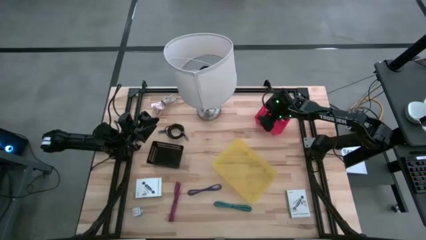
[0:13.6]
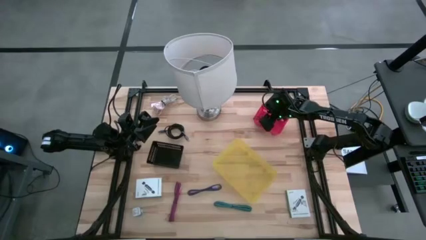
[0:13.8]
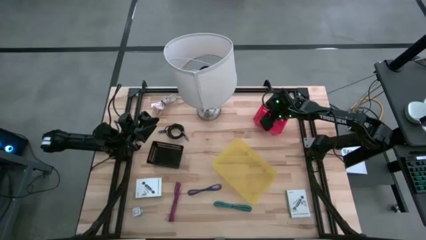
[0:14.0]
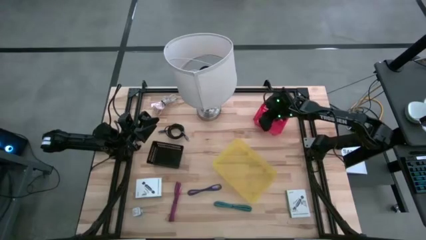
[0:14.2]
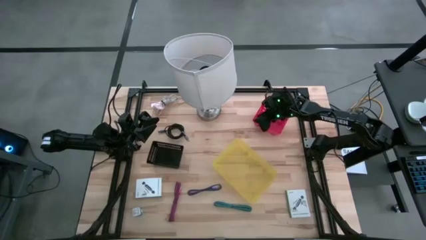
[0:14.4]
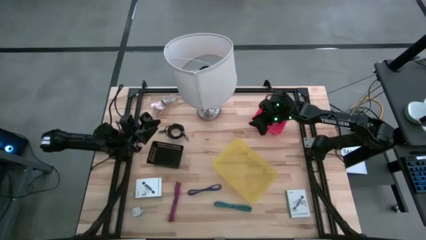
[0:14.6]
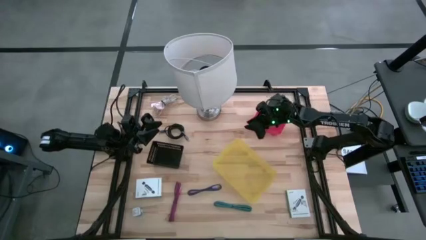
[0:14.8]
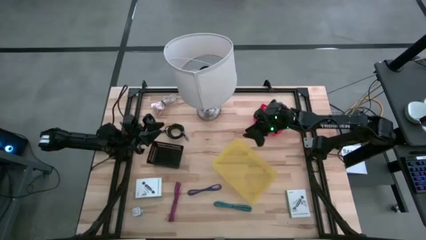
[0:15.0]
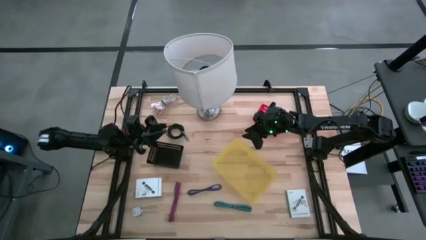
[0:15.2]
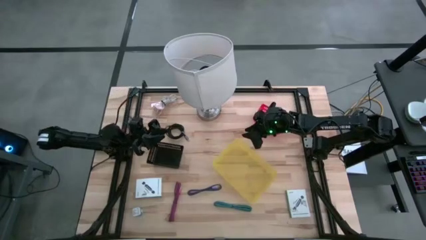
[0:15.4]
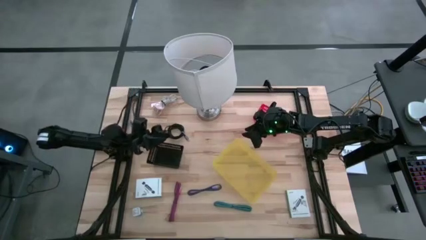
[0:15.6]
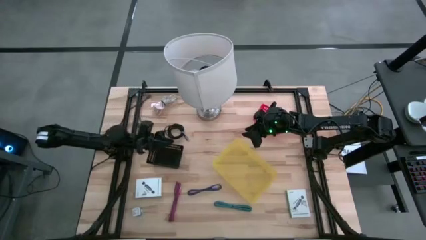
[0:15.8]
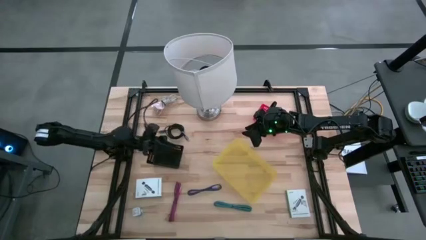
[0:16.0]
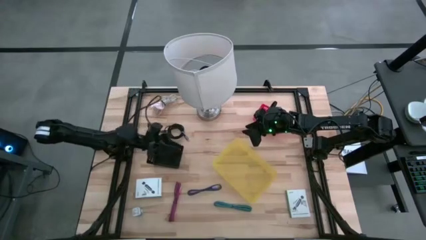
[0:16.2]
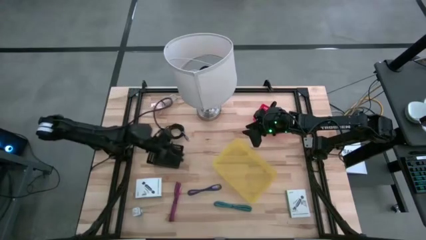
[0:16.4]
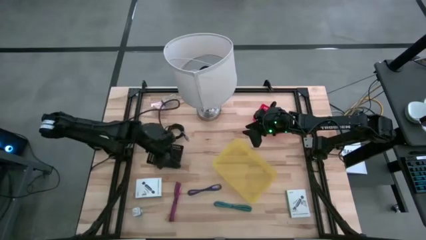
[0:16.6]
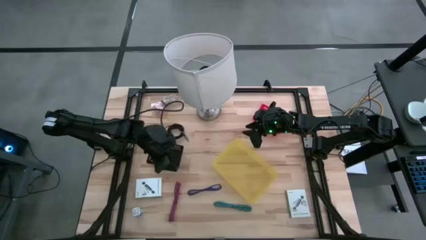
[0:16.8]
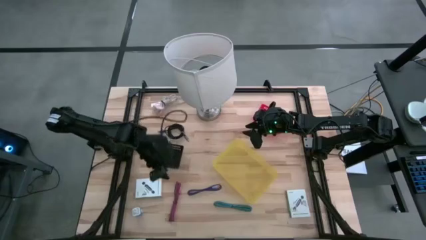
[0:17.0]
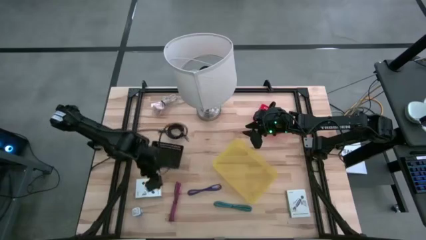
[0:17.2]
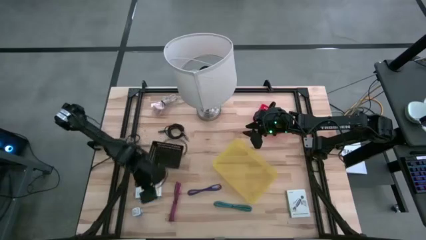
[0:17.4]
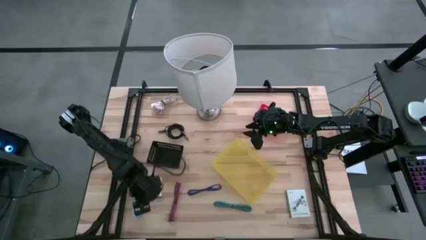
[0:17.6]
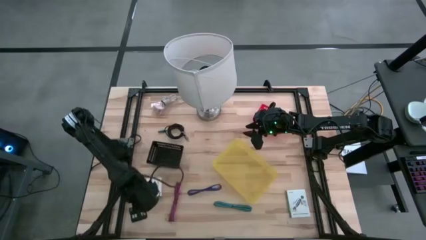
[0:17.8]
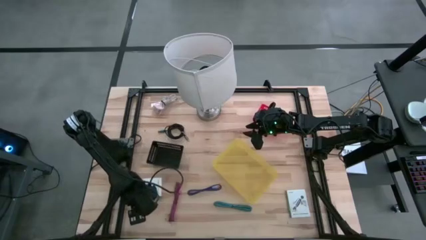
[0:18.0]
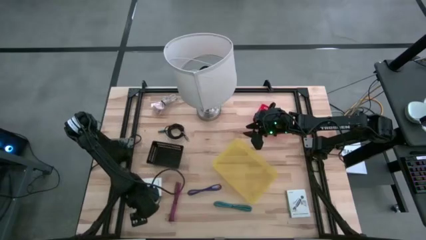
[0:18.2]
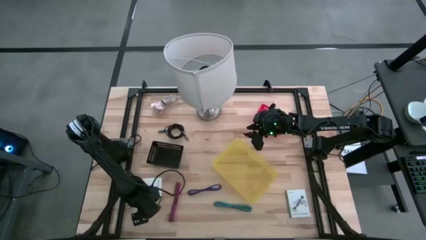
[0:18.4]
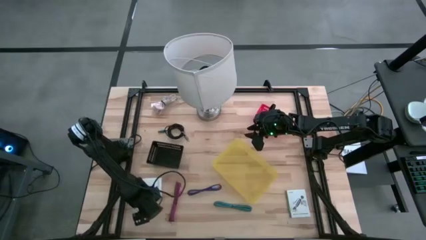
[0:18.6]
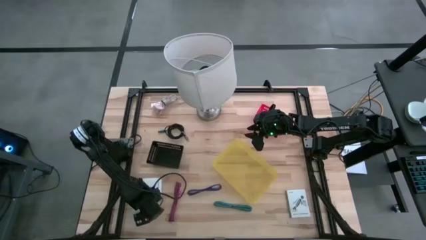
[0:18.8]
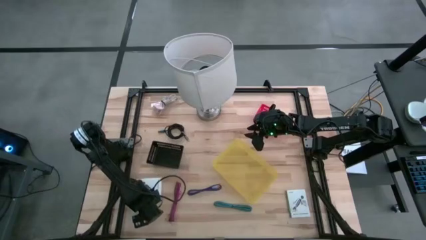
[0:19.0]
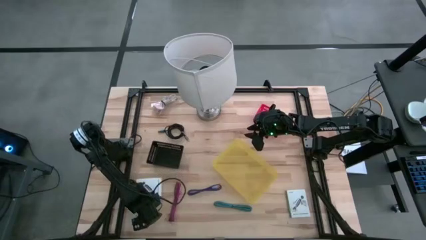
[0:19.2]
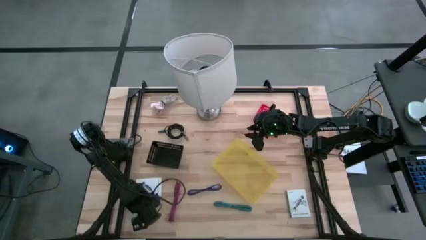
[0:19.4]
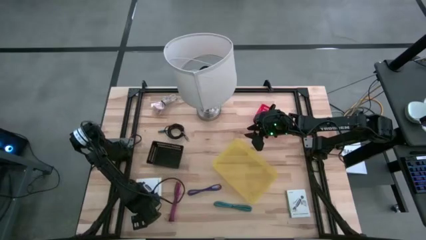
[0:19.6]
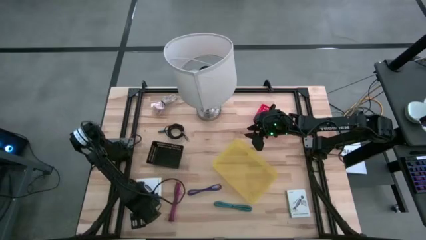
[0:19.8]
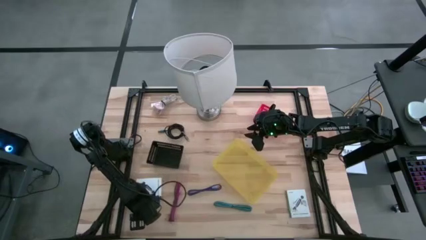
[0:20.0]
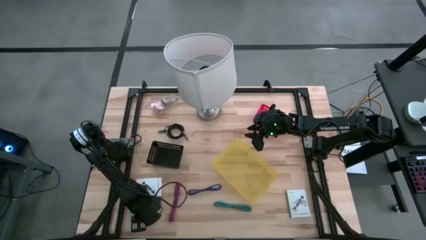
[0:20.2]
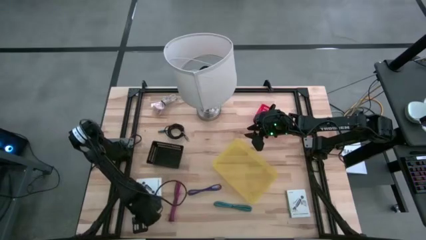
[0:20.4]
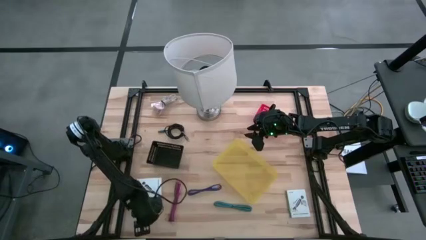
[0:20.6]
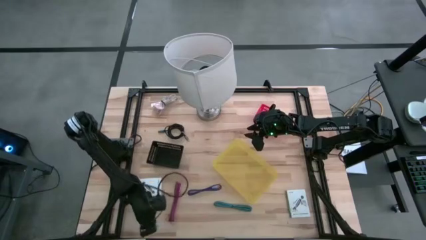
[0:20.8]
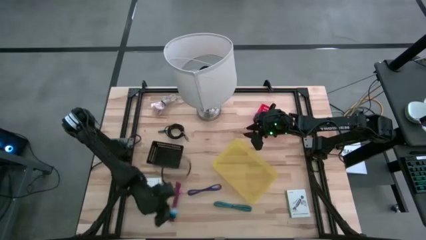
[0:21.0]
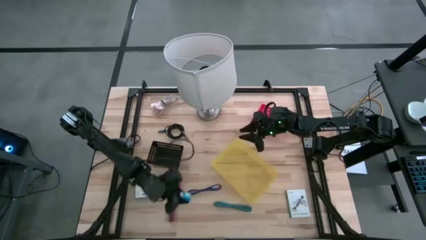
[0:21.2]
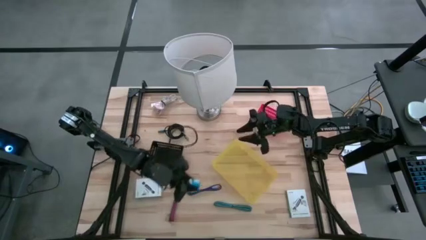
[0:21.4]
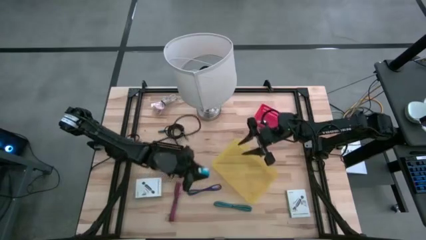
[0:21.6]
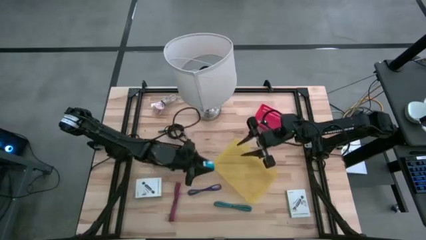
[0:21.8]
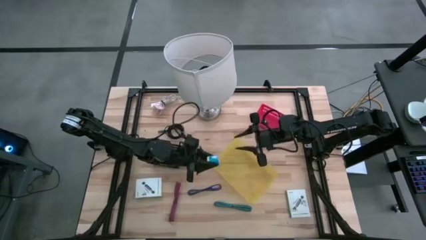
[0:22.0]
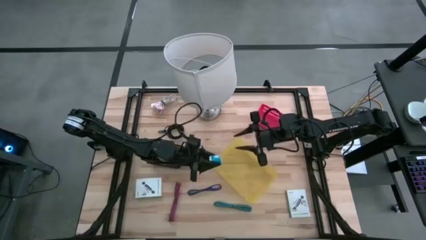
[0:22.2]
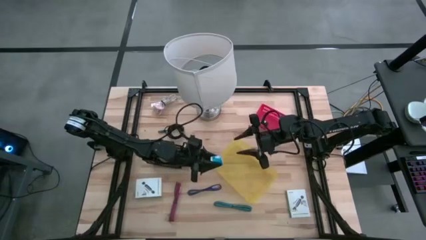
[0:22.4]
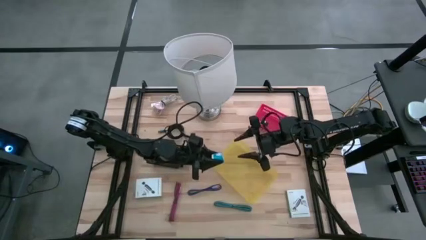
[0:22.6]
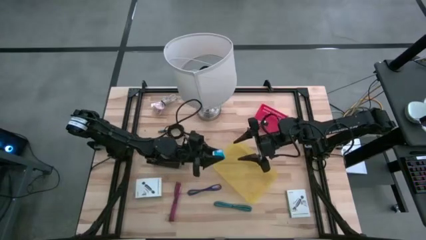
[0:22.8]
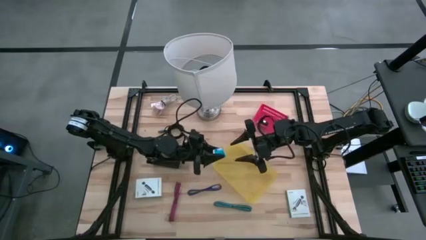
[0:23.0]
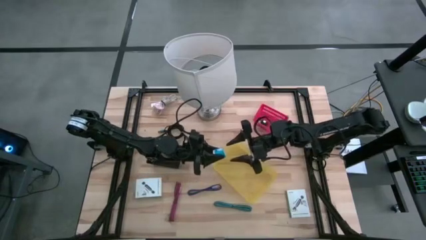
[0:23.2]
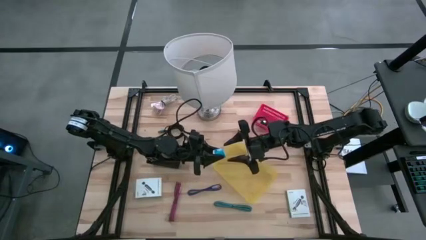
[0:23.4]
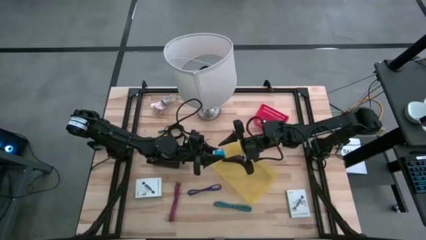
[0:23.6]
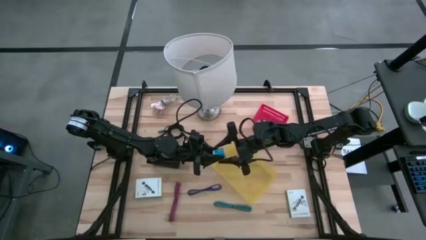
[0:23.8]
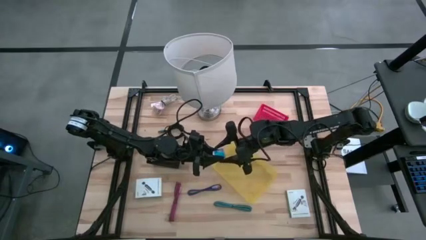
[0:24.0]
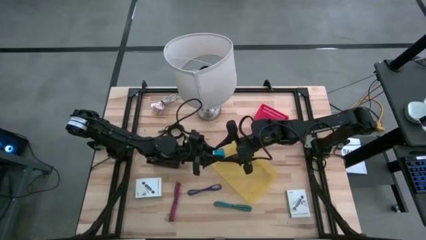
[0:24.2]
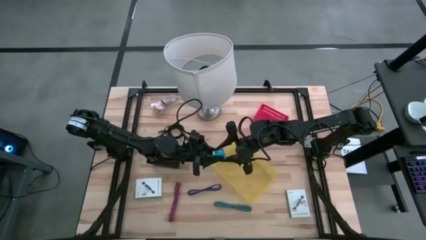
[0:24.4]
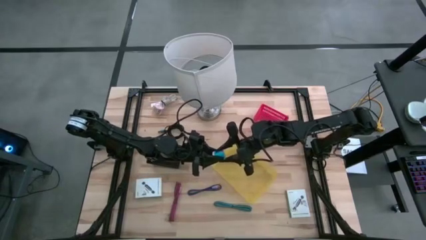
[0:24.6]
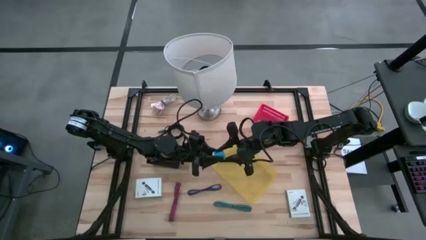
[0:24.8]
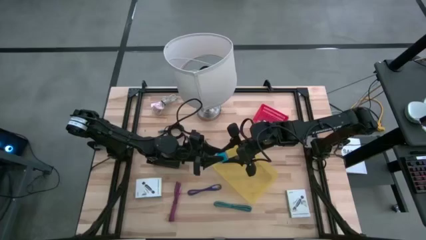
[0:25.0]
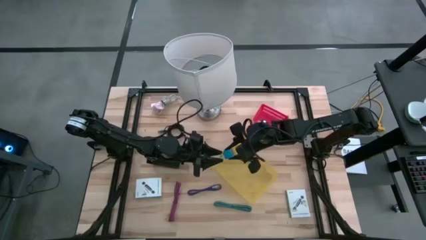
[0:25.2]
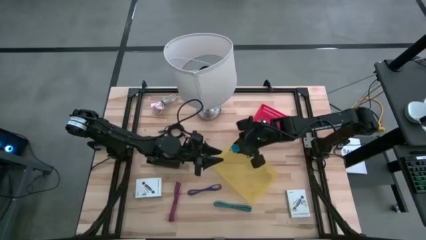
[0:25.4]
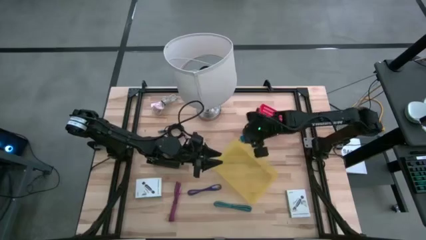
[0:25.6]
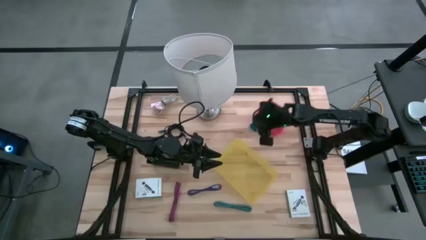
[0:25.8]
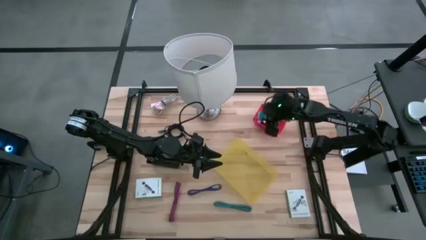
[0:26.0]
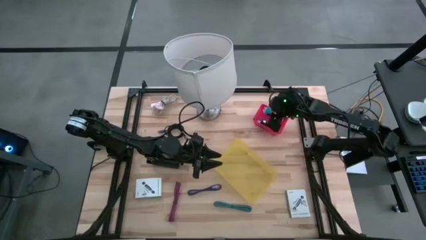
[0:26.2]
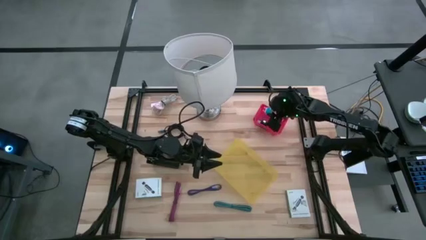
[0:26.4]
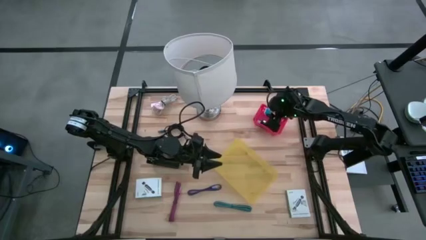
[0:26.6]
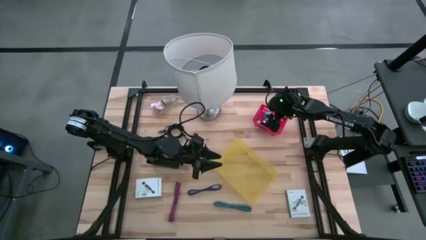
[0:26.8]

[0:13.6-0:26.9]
Task: Pick and place items into bin
Put the blue charger adapter into the red bin
